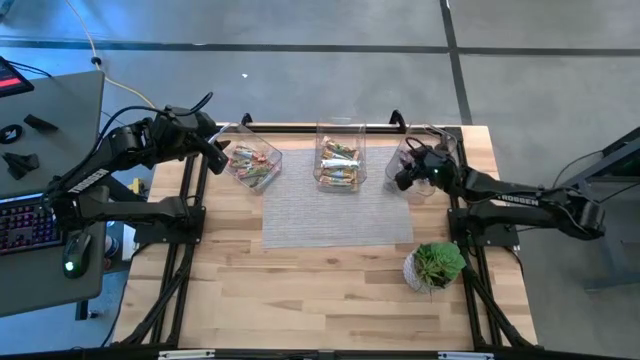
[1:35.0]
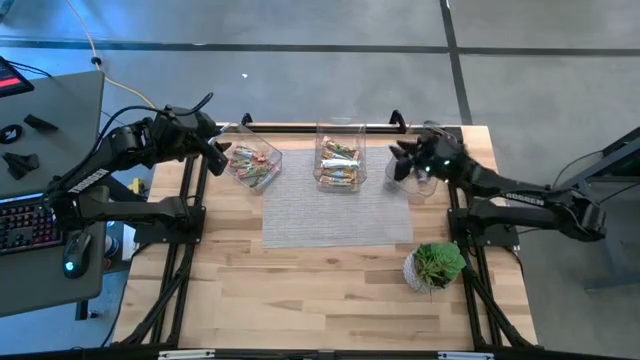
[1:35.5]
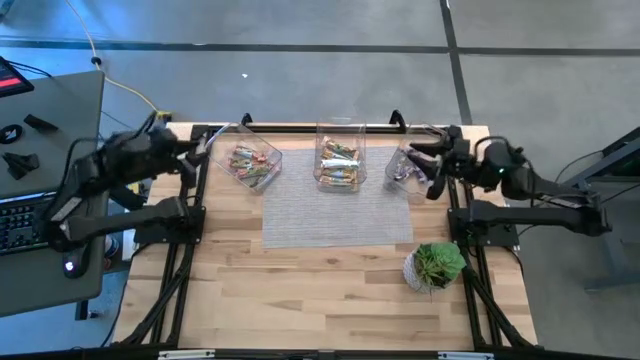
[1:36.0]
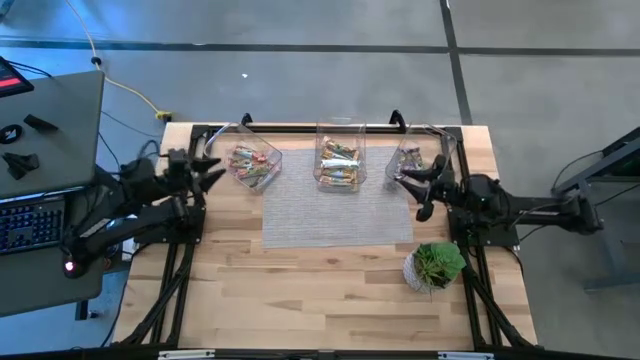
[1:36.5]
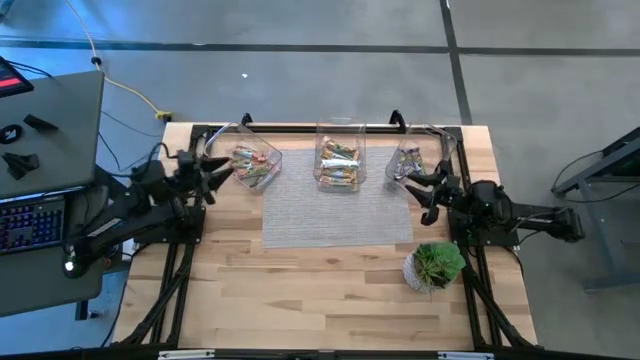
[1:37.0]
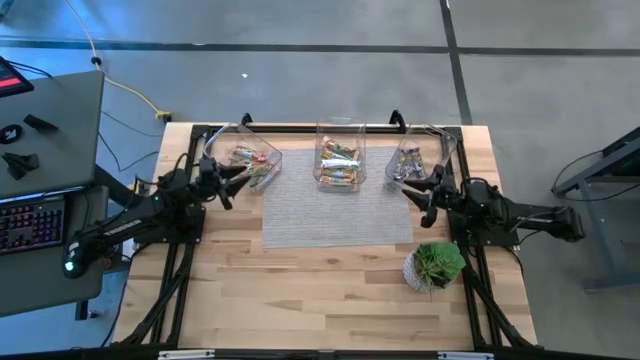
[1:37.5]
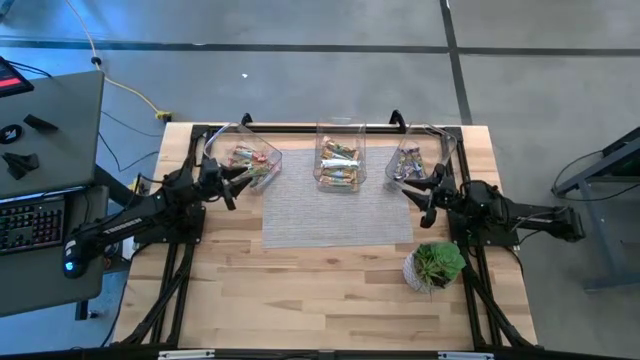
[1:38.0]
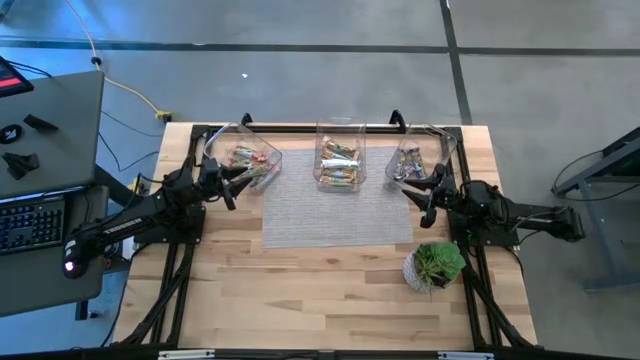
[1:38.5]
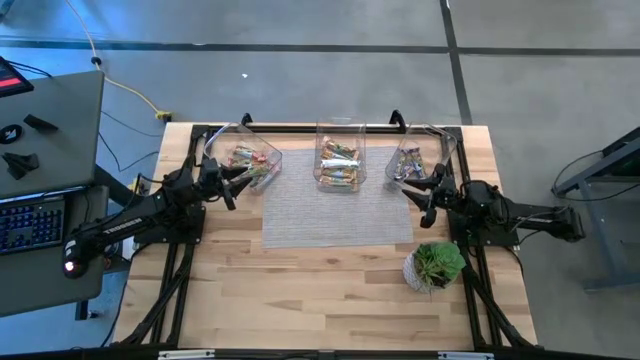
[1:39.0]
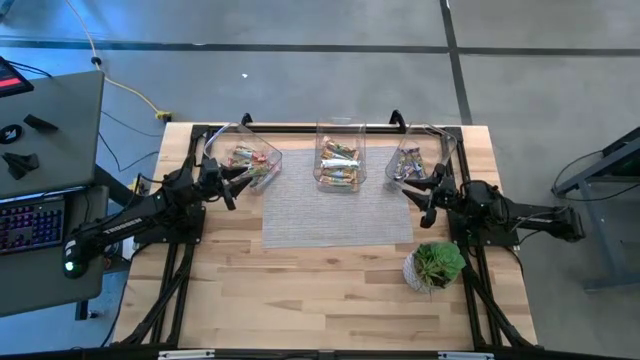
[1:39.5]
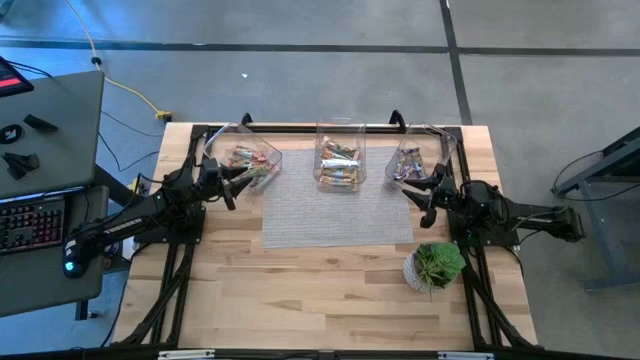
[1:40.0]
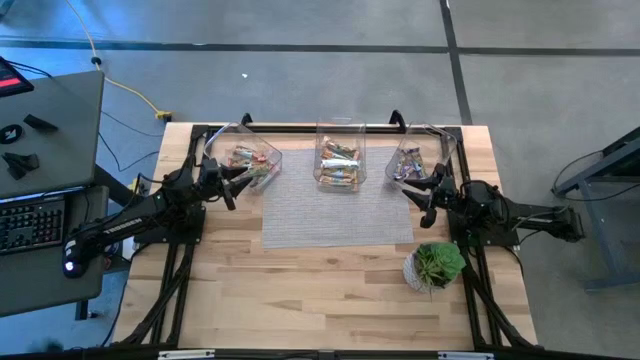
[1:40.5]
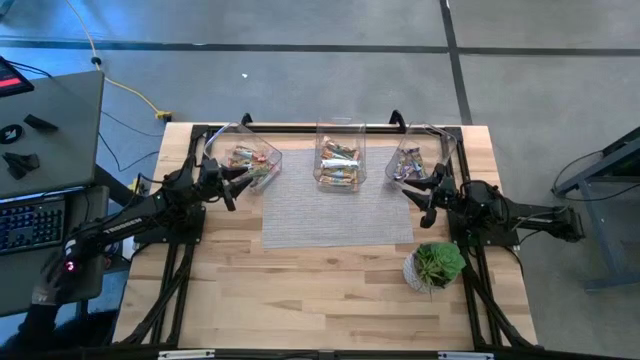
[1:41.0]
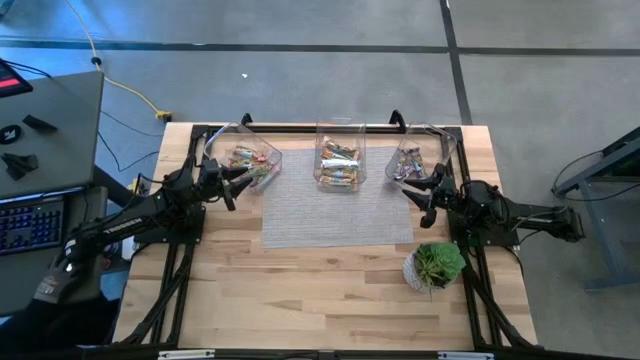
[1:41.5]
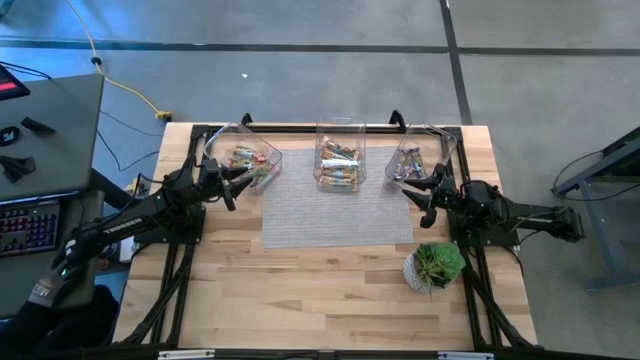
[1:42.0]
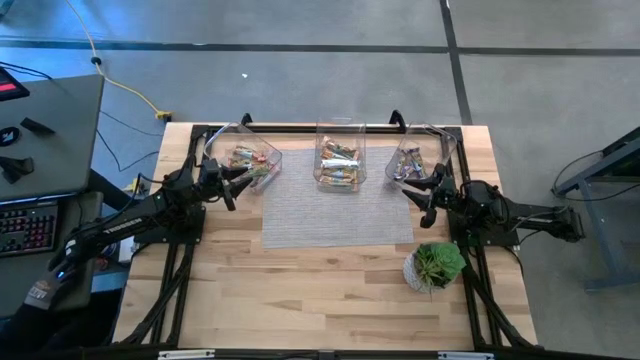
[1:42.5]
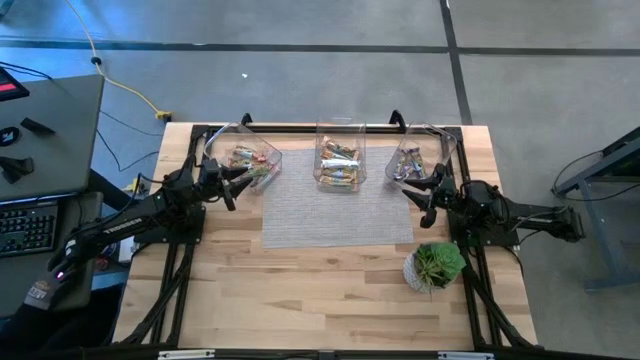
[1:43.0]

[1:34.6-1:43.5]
Task: Pick and place Granola Bars by type
Return to Home Position
